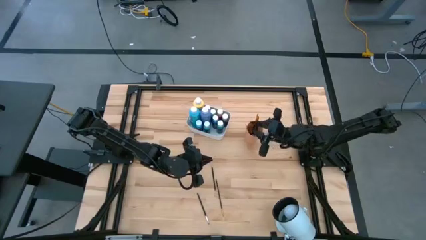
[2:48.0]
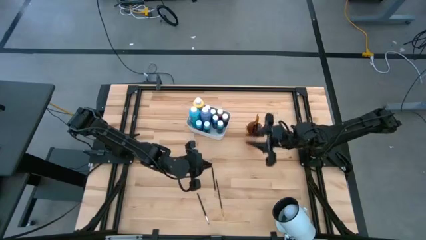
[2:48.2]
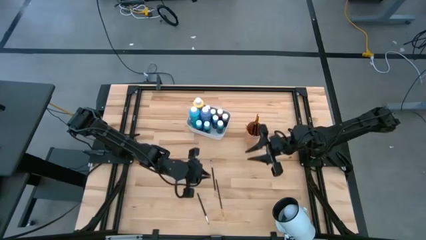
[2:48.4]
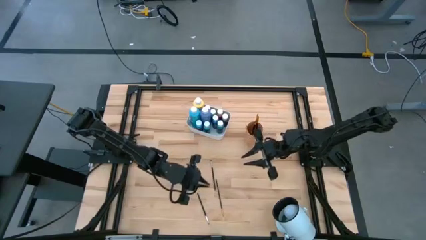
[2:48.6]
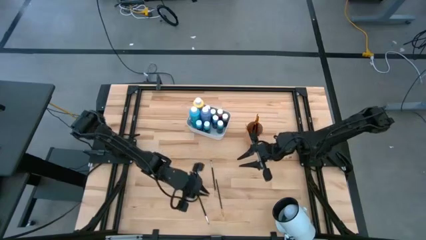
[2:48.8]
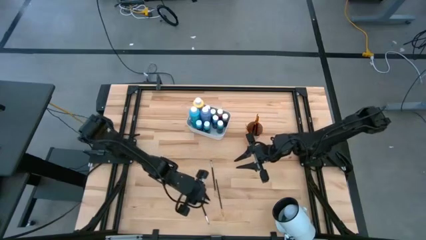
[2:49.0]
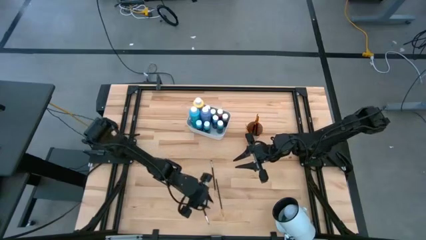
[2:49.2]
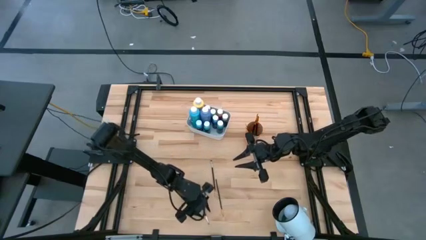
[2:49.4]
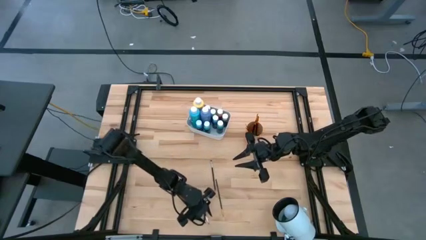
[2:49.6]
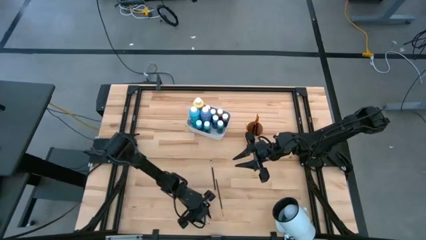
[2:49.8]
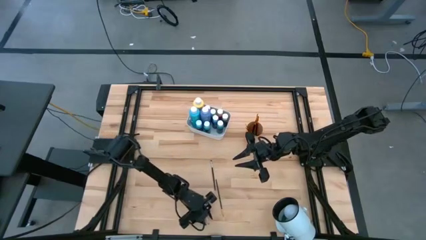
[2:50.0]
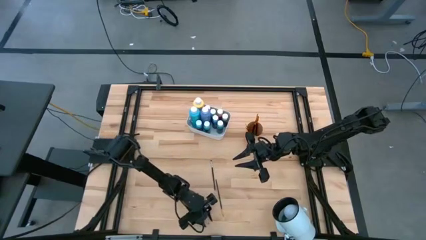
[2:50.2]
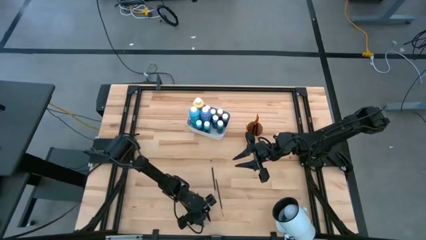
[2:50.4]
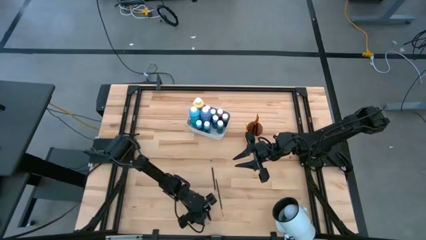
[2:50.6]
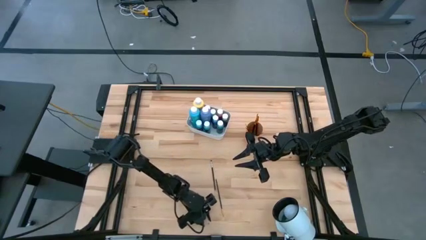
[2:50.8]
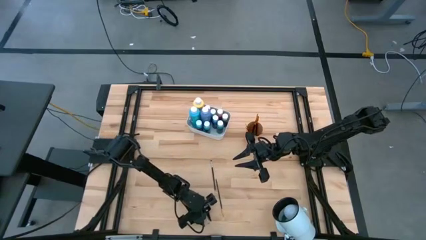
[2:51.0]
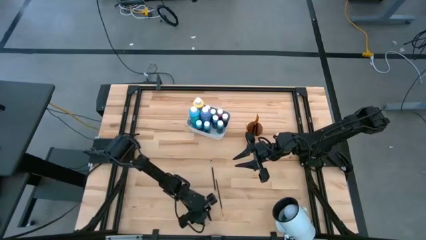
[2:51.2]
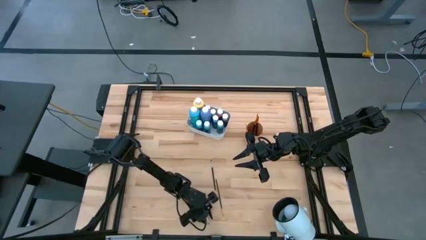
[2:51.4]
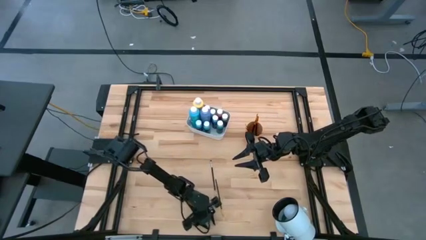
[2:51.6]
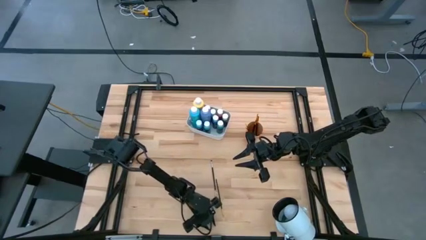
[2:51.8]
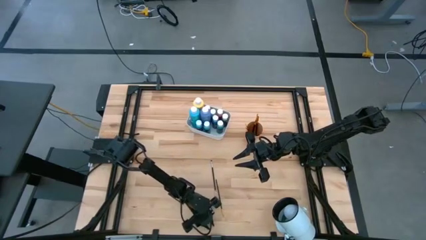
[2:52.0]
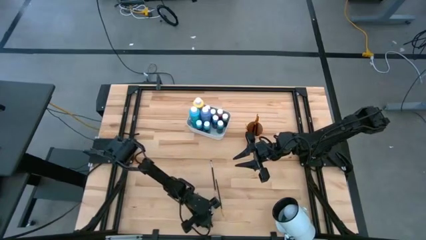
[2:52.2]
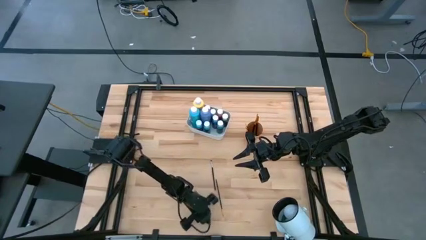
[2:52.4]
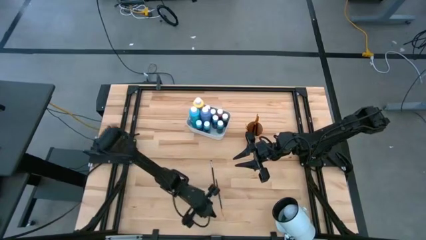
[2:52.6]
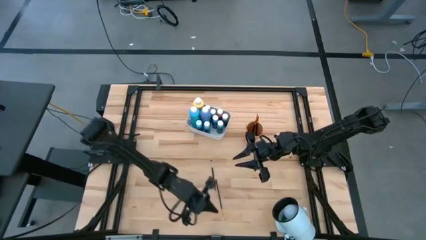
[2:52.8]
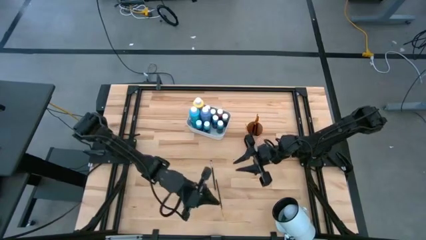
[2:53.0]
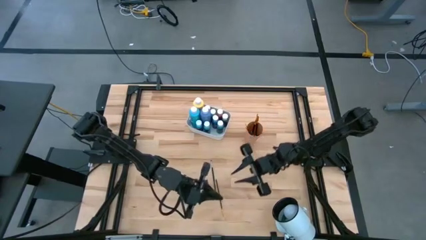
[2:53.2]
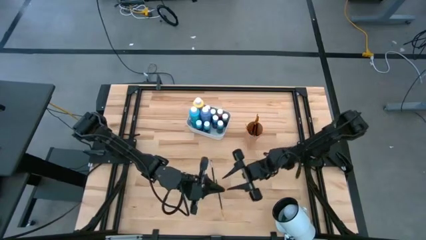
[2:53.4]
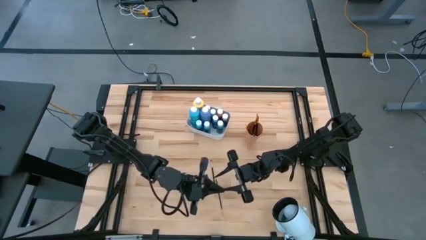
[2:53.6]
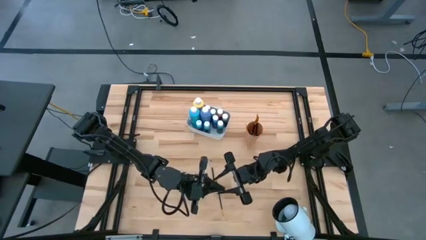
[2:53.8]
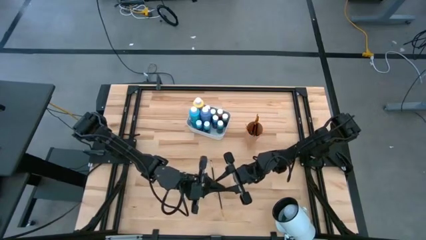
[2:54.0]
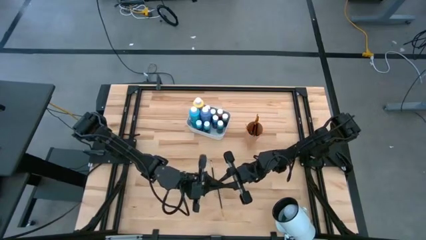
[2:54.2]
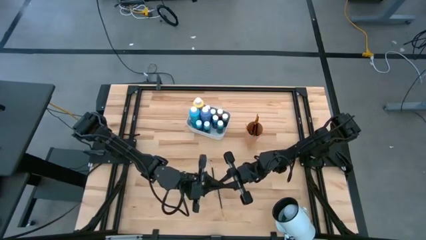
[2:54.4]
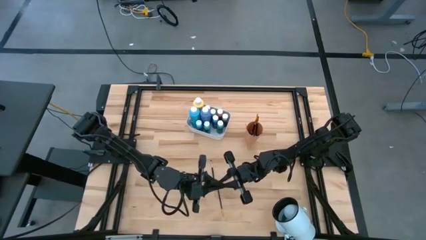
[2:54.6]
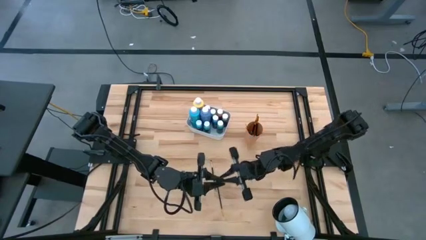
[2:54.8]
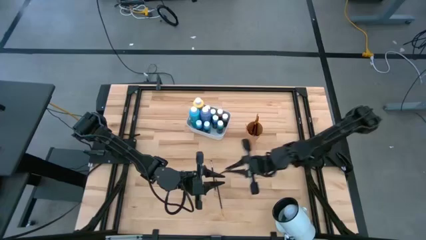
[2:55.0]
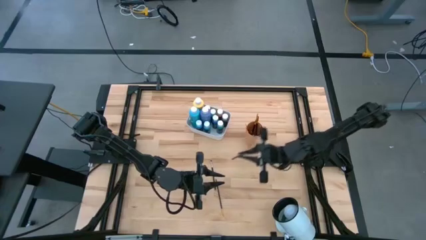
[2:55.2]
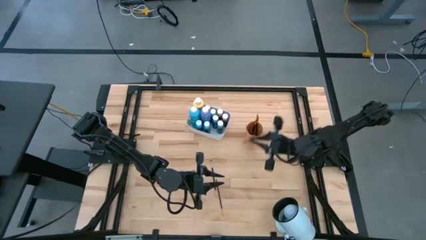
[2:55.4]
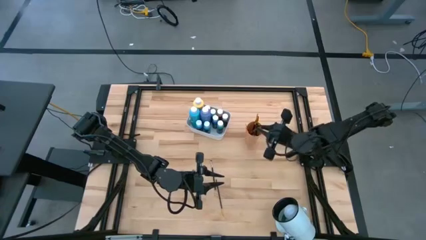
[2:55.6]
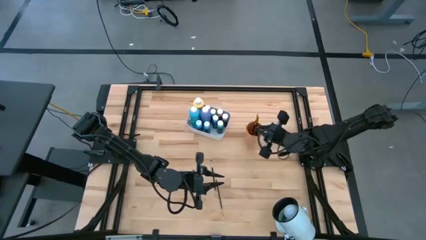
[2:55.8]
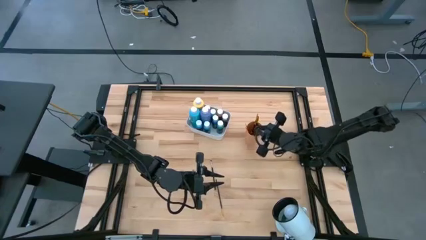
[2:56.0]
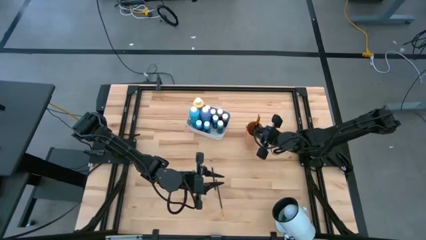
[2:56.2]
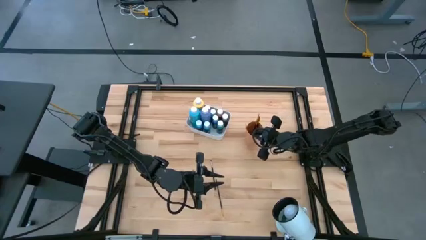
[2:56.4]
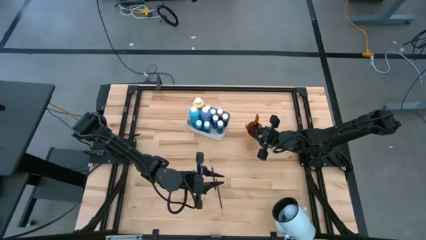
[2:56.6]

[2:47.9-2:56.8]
Task: Pick & Place Paint Supplies
Put the silver paintbrush into the cup

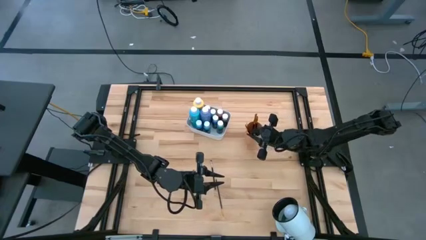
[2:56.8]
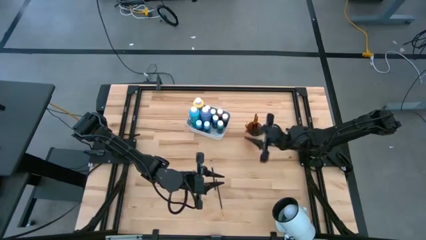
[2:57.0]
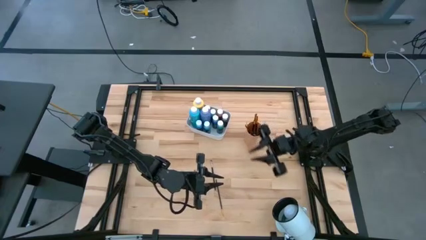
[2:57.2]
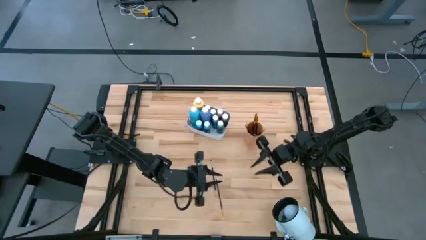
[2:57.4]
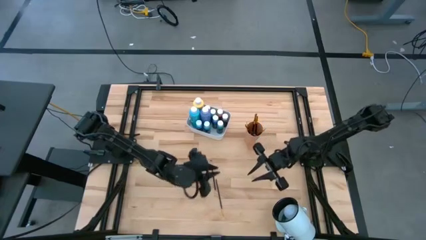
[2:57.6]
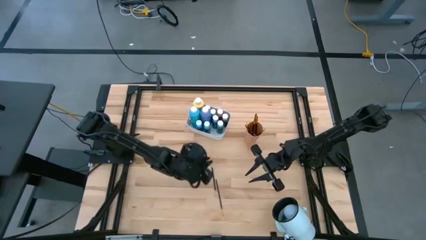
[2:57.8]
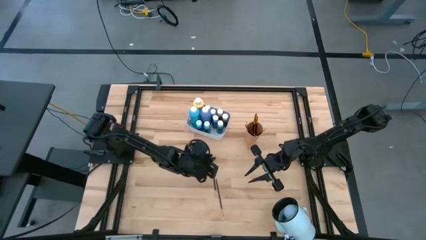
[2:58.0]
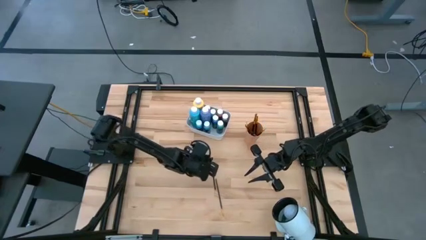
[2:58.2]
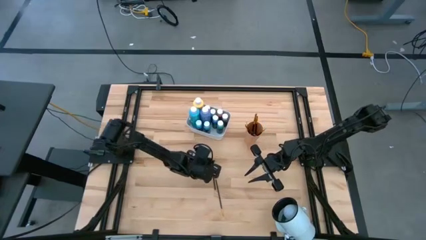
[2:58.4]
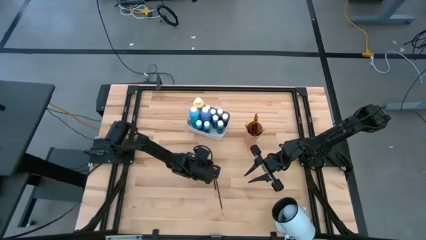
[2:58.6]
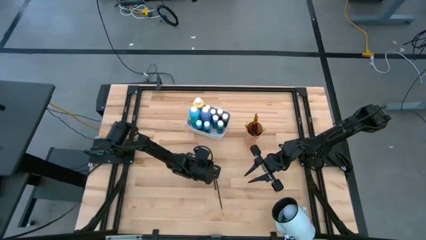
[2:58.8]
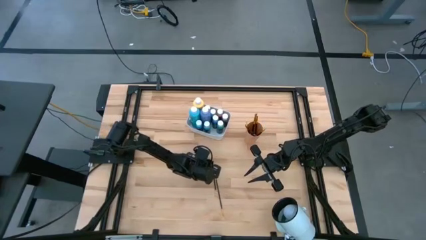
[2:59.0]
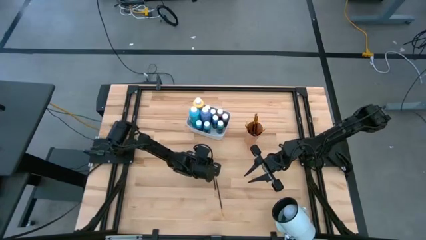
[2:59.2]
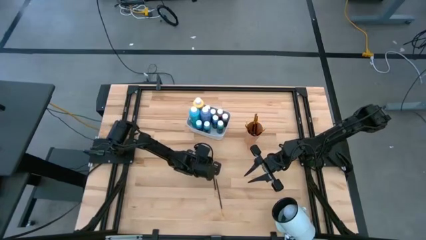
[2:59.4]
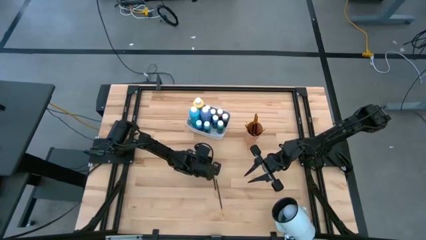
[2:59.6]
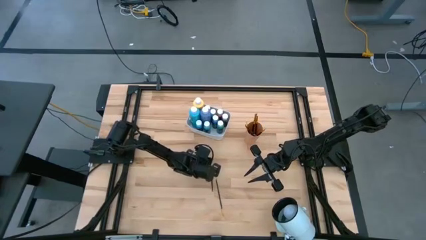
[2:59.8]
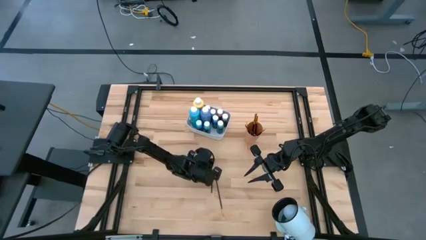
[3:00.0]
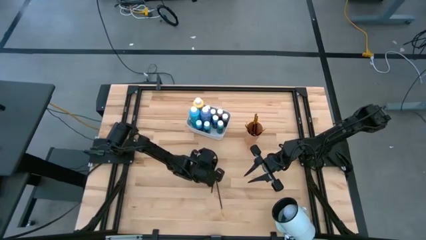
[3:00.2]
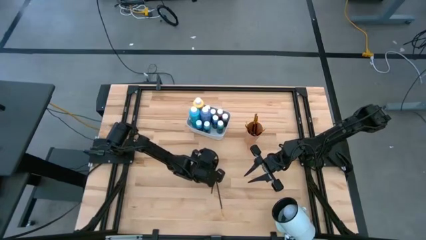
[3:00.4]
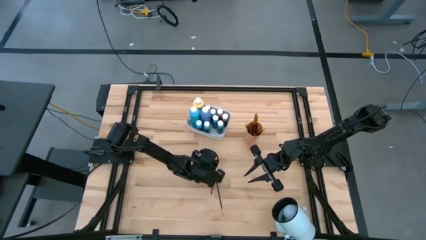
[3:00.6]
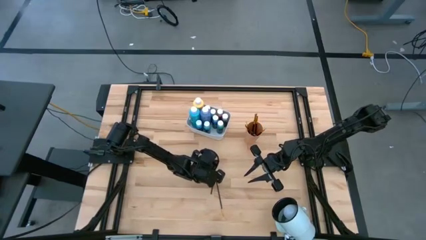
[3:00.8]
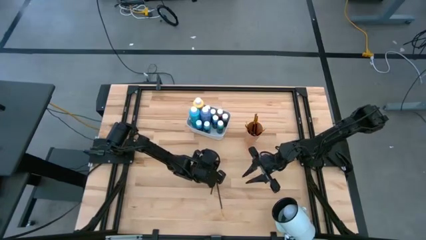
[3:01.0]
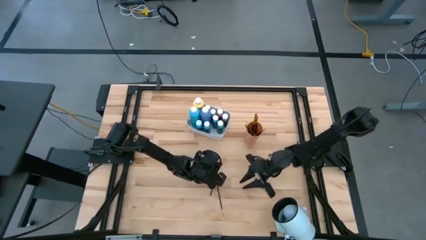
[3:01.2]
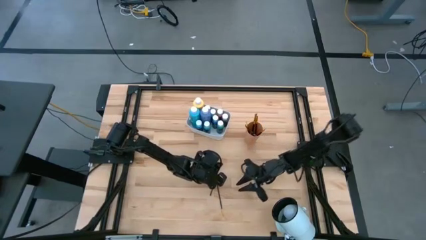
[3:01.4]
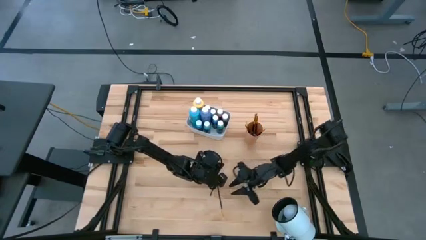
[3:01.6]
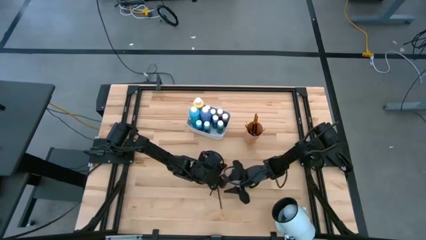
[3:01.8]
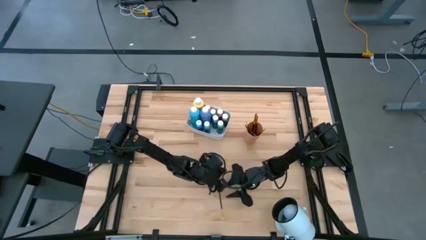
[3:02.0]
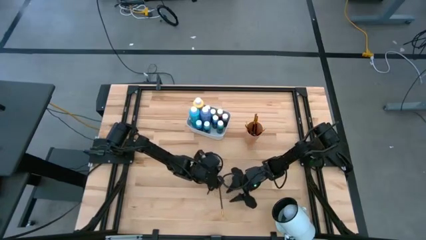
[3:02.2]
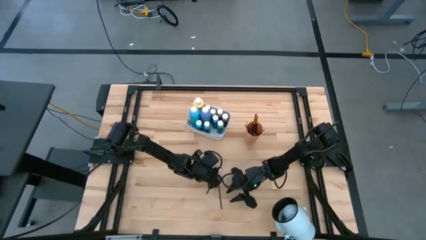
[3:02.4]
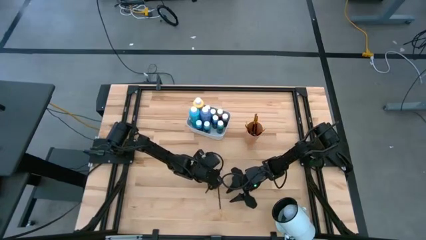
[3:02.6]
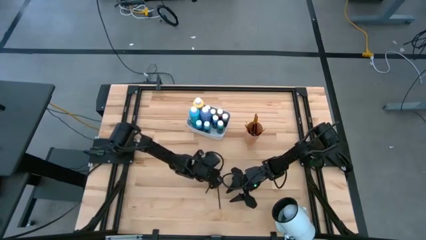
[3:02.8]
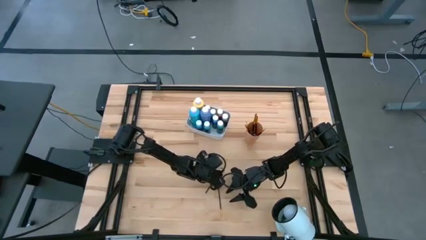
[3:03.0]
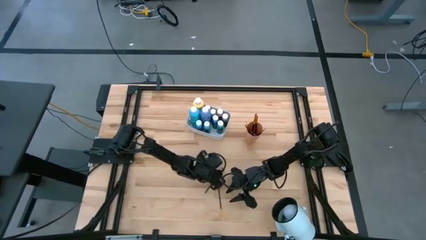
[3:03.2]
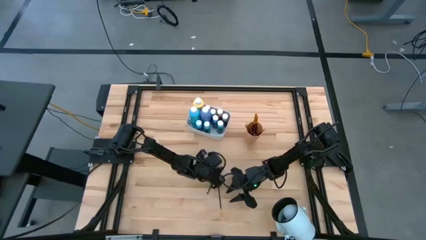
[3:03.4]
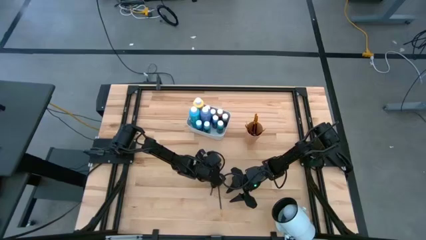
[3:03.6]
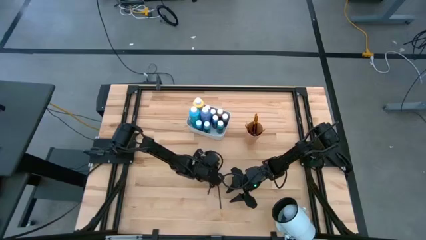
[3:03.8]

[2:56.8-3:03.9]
Put the silver paintbrush into the cup
